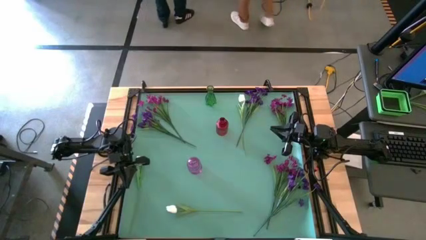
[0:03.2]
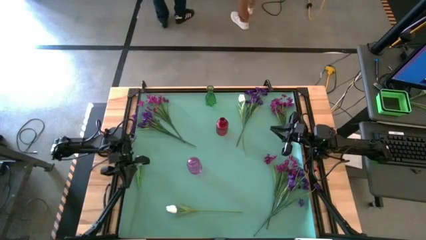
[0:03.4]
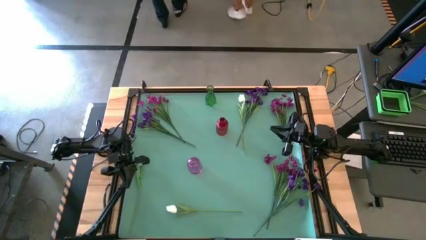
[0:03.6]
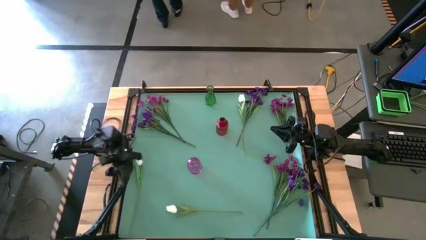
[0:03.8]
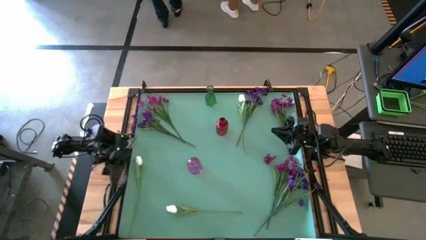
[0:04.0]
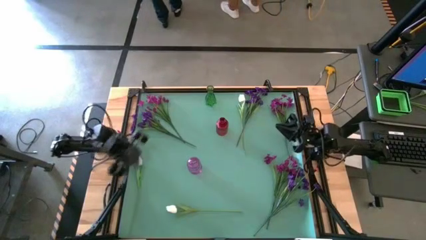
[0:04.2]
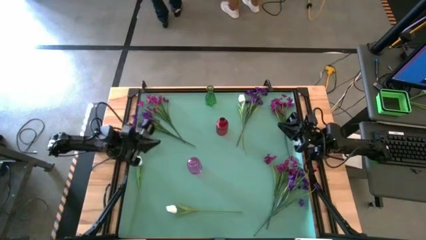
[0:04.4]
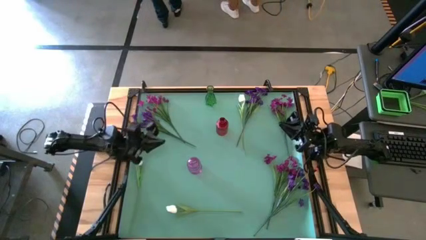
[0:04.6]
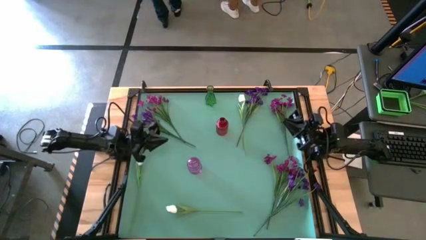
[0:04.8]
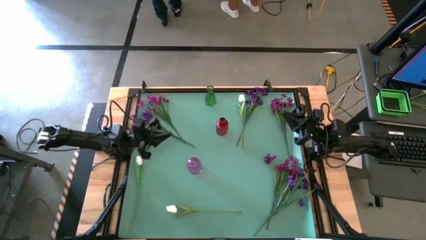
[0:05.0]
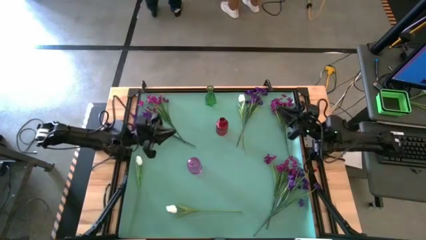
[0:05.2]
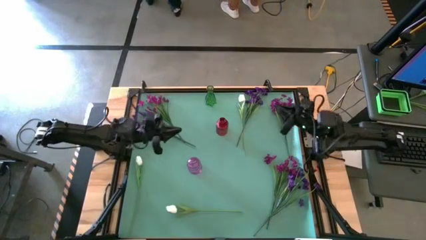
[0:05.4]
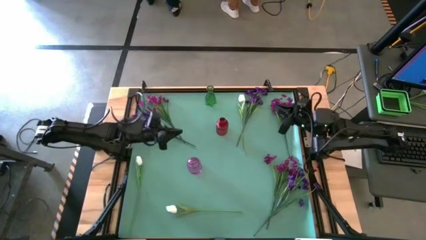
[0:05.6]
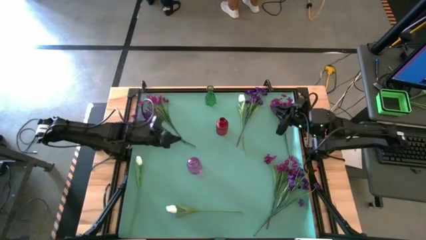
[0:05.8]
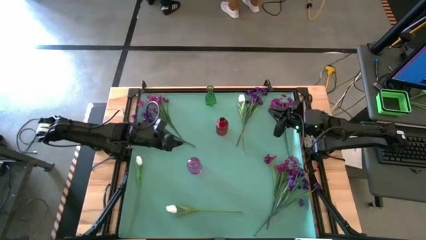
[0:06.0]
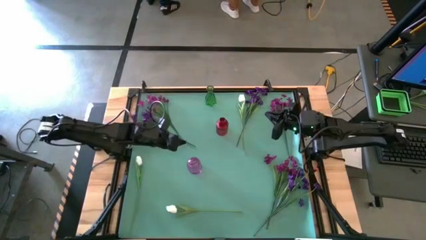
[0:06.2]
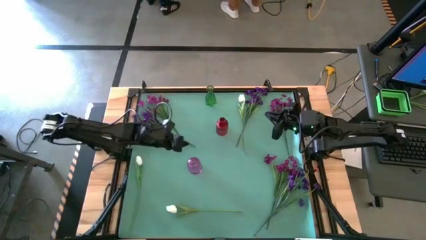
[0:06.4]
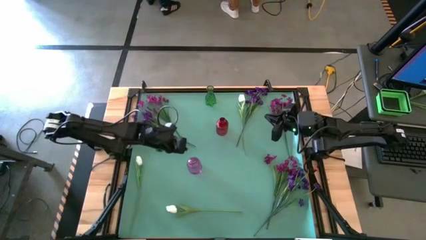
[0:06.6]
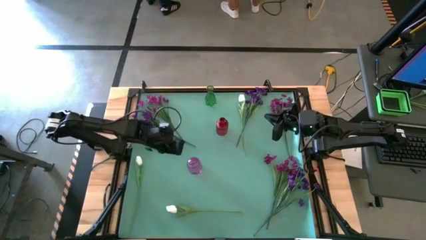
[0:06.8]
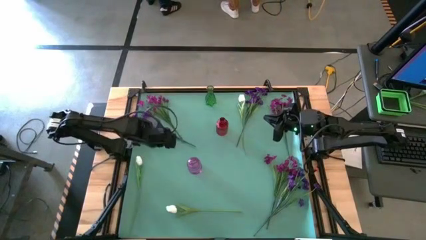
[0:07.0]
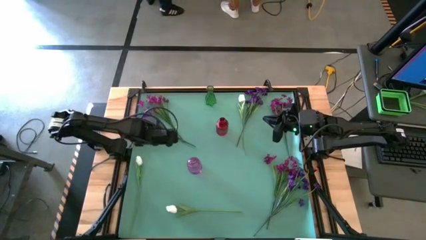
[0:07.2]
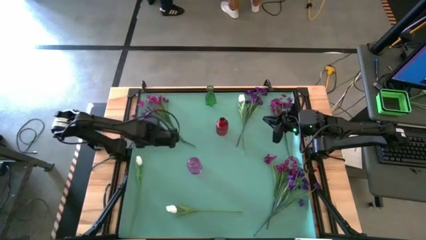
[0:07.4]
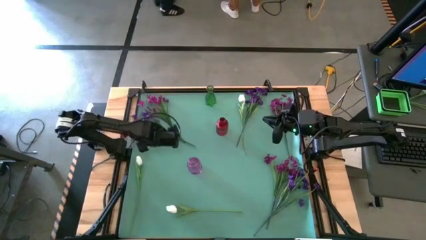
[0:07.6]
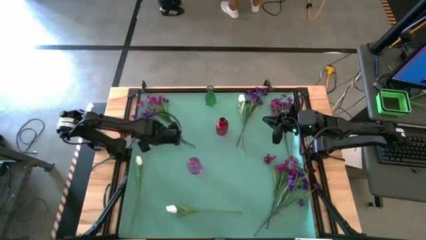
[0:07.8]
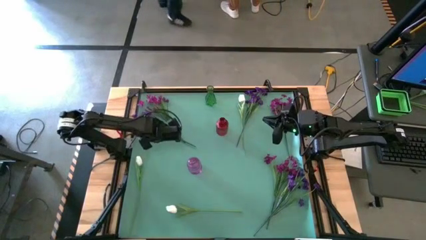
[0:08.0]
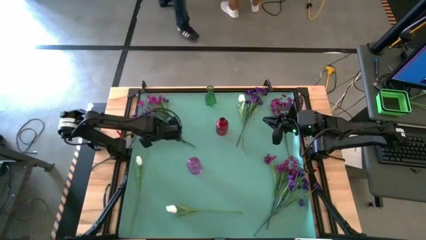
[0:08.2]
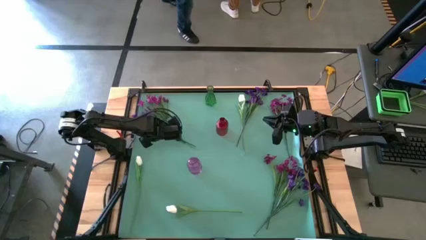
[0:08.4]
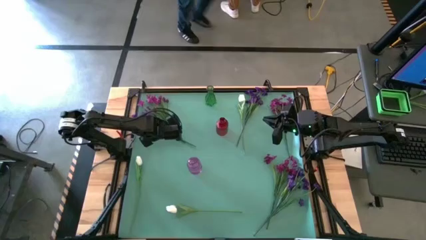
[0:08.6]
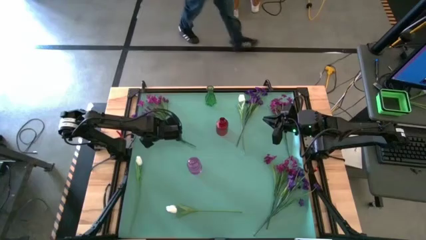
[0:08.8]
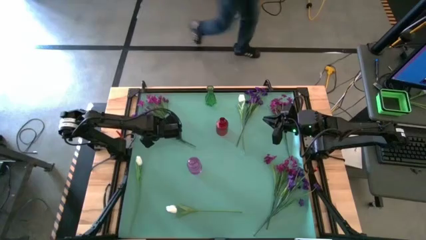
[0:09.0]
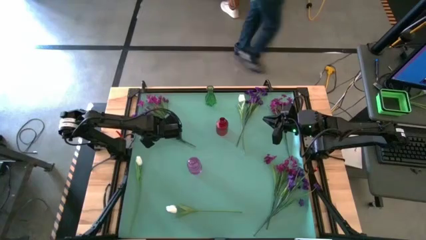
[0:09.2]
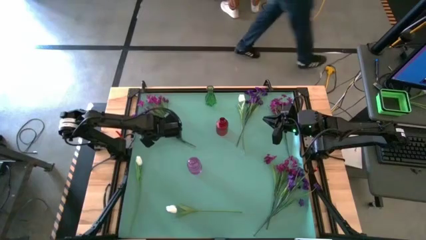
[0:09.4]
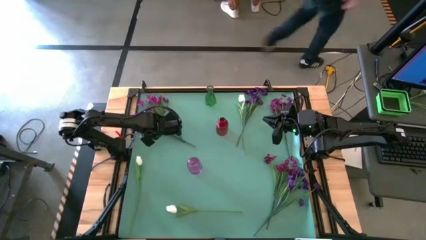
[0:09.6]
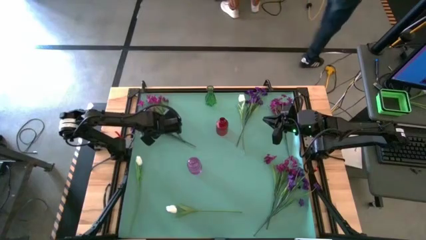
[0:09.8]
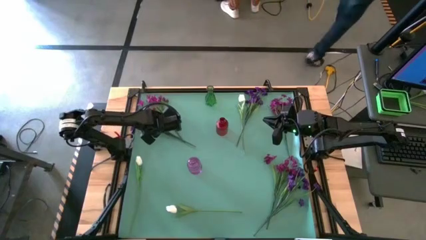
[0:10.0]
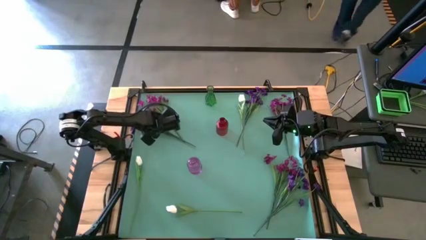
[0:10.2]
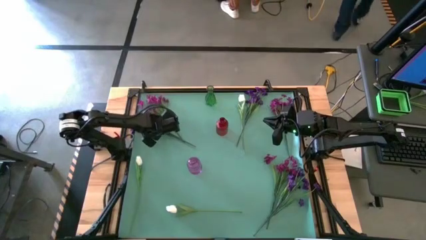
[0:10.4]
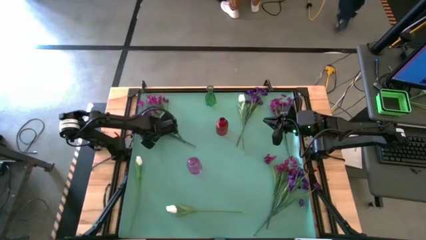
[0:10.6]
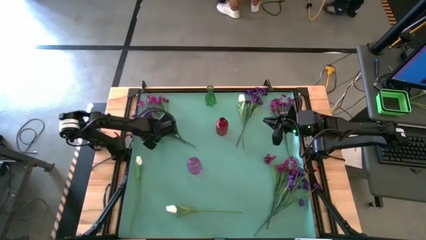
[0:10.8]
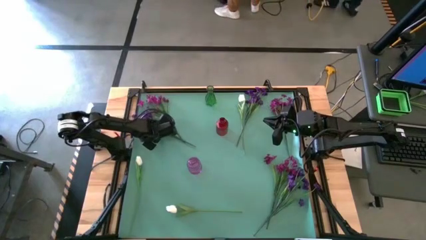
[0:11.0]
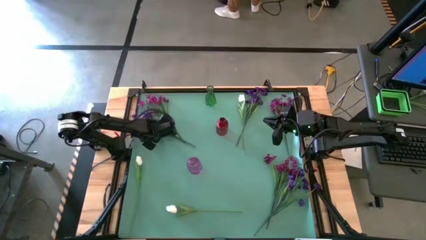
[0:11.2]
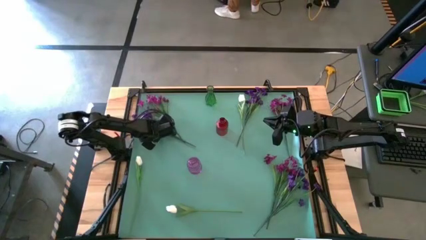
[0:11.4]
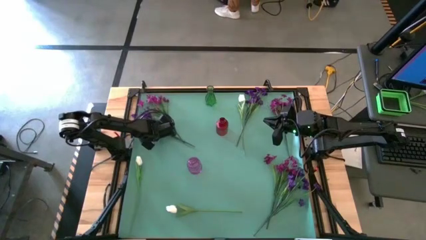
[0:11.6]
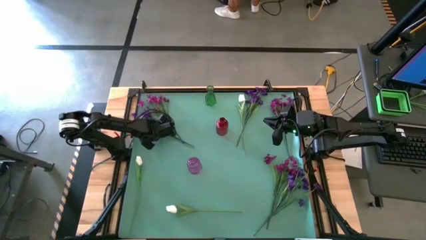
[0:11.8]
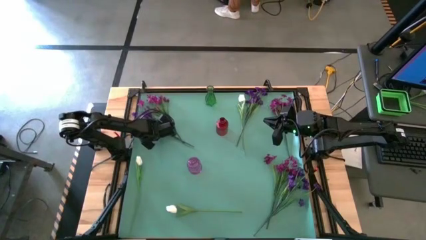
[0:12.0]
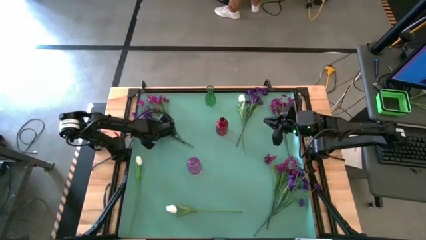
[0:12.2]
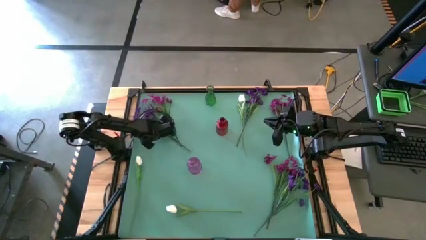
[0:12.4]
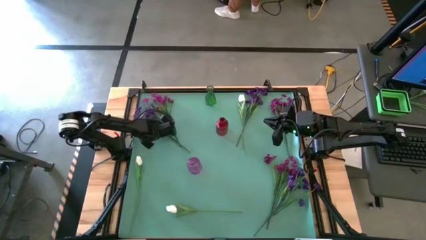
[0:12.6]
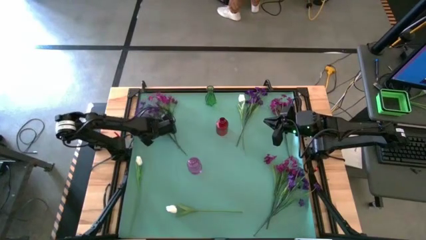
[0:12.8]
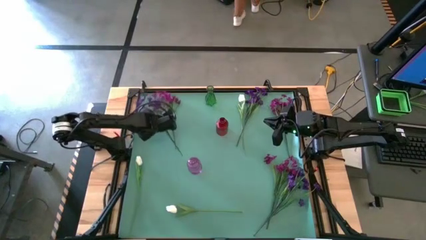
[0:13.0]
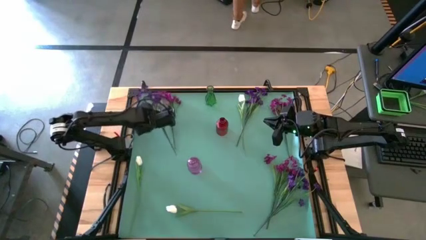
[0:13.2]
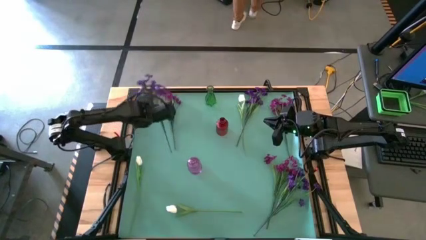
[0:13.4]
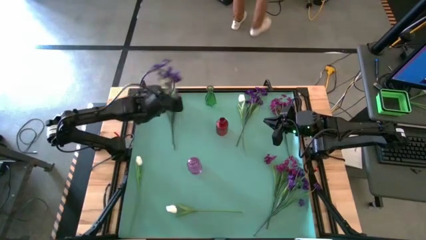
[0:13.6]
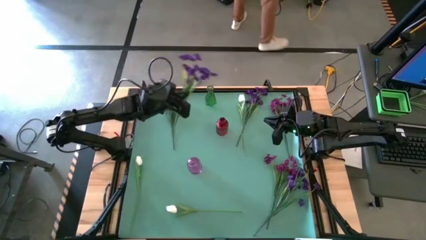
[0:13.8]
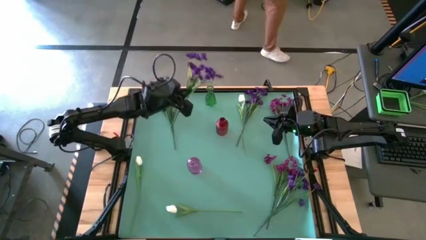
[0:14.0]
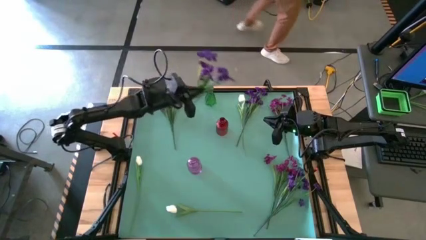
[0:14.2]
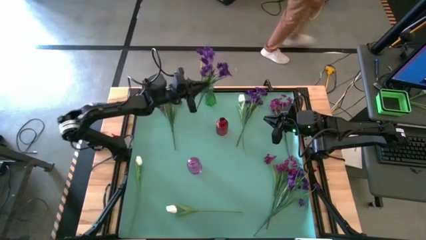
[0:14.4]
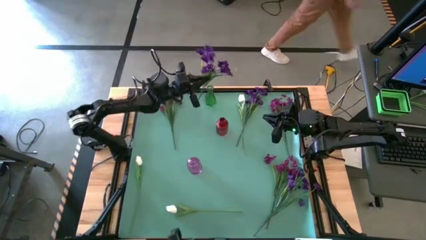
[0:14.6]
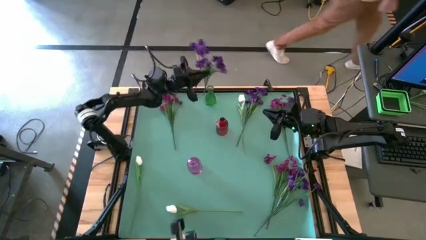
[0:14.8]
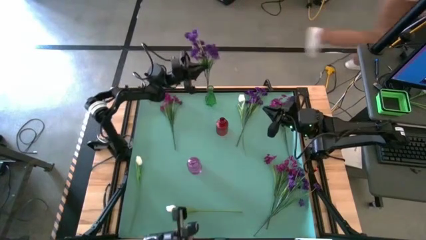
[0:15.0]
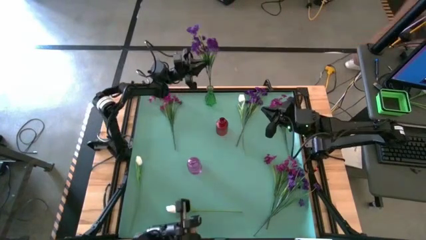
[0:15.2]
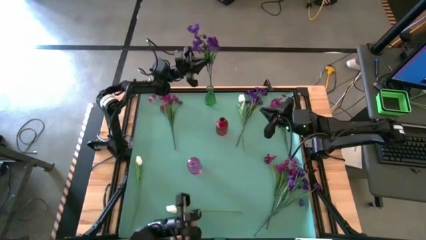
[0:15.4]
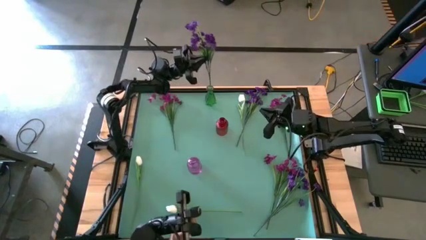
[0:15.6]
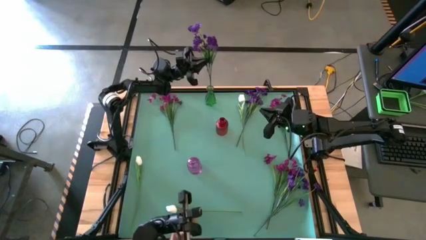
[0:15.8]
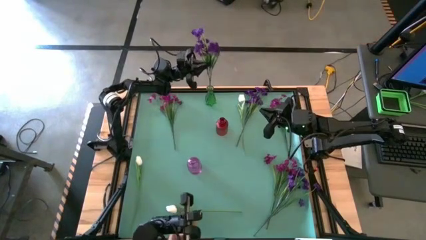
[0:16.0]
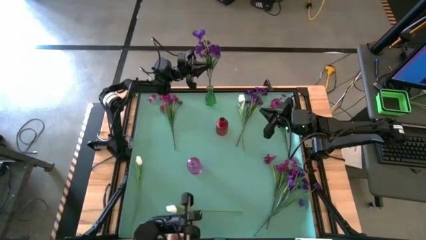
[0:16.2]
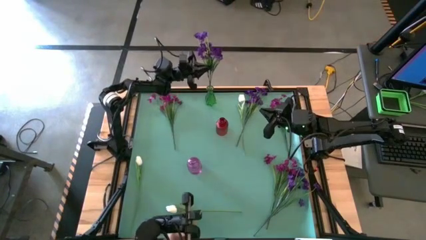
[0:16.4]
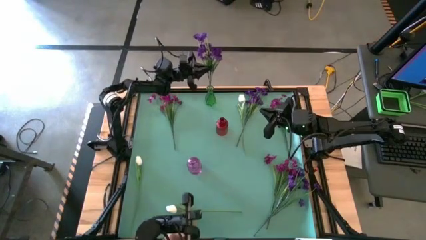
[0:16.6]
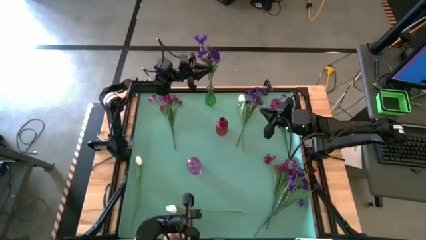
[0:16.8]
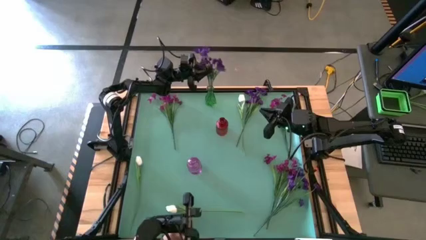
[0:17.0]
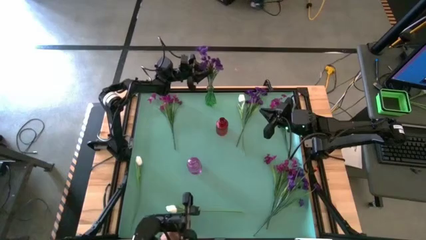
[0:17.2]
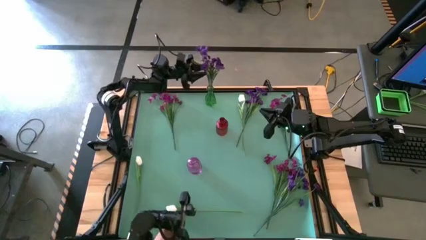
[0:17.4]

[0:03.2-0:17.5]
Task: Sort flowers into vase by color
Put the left purple flower into the green vase
